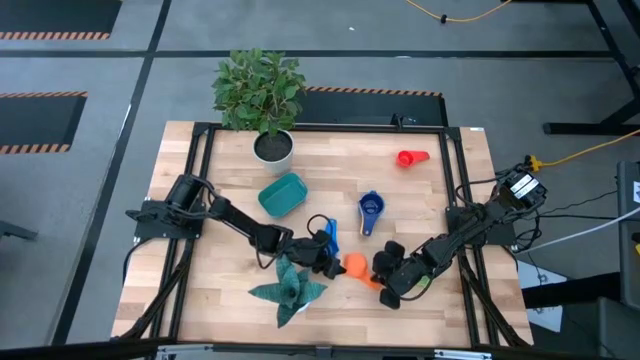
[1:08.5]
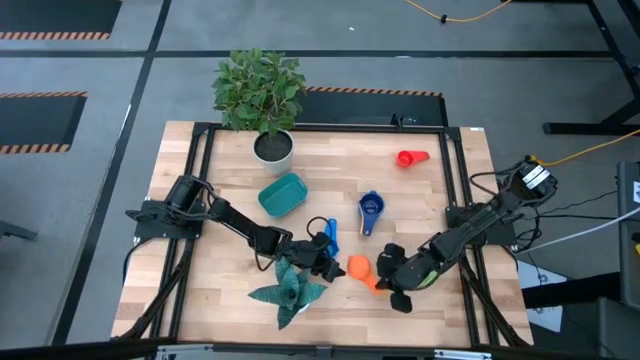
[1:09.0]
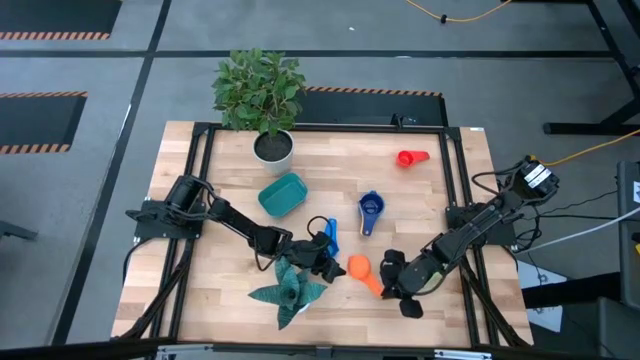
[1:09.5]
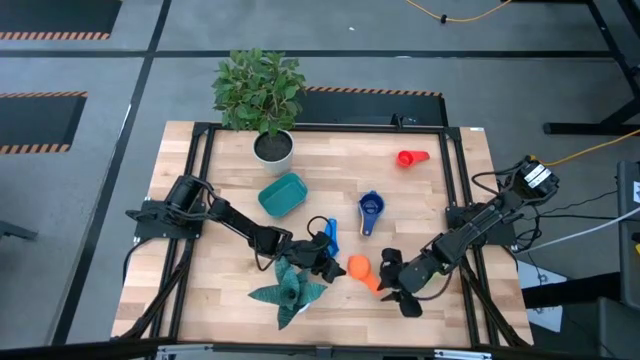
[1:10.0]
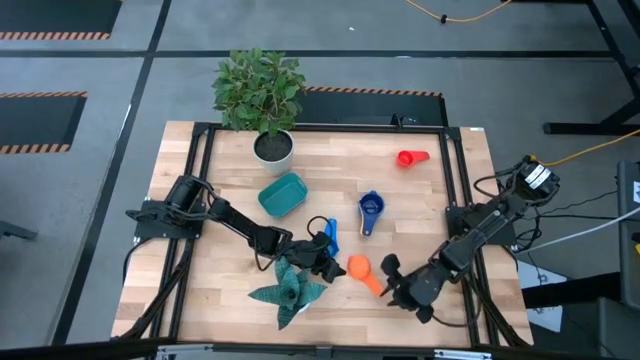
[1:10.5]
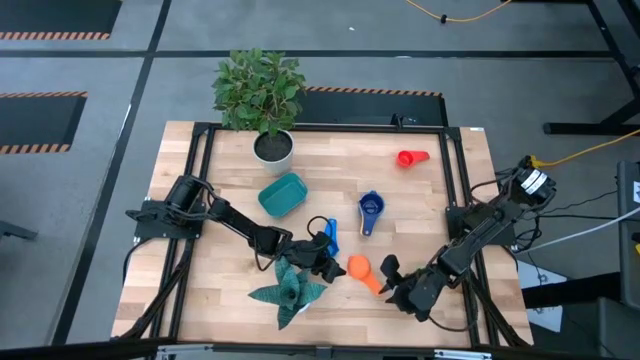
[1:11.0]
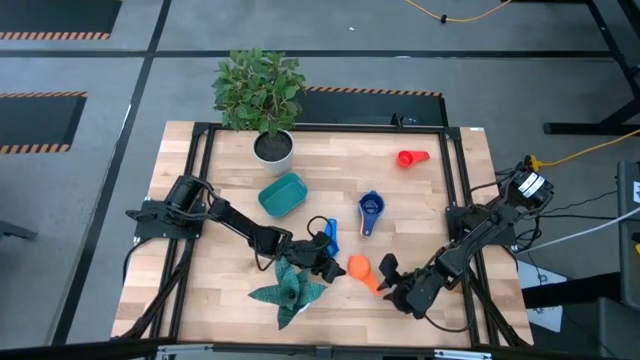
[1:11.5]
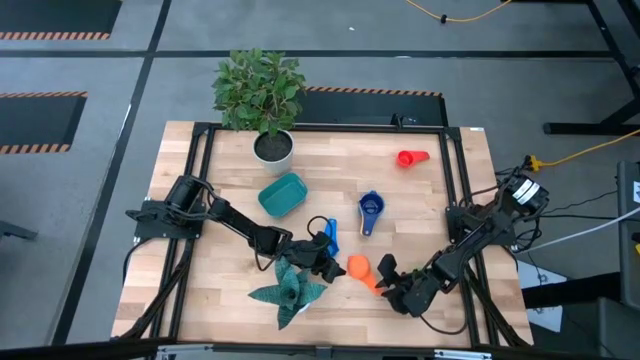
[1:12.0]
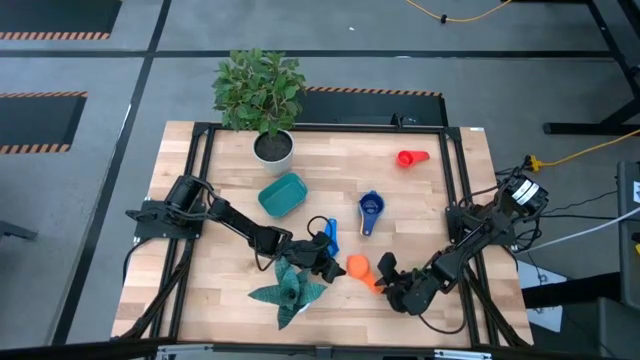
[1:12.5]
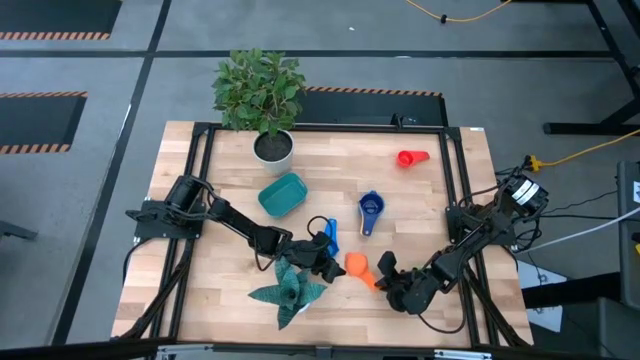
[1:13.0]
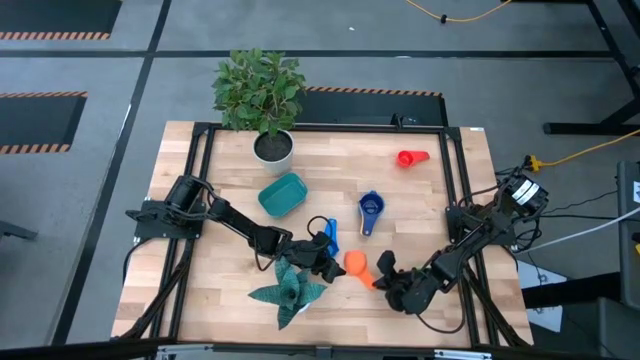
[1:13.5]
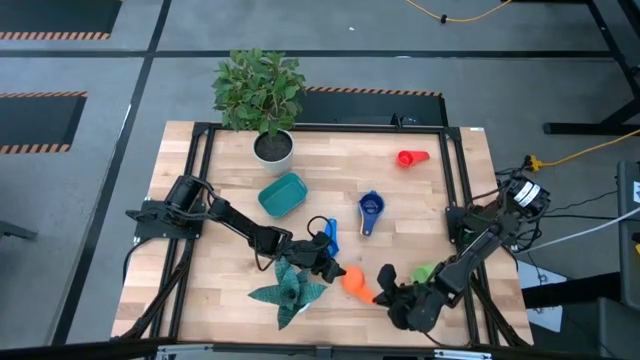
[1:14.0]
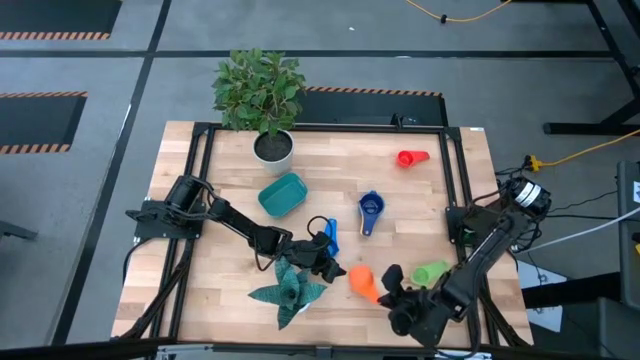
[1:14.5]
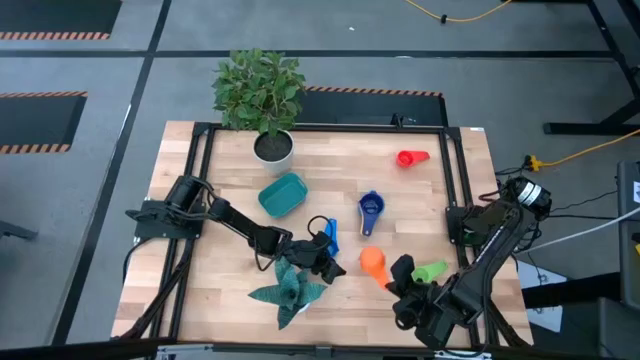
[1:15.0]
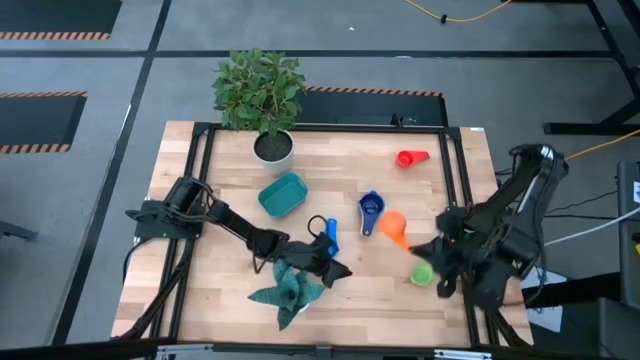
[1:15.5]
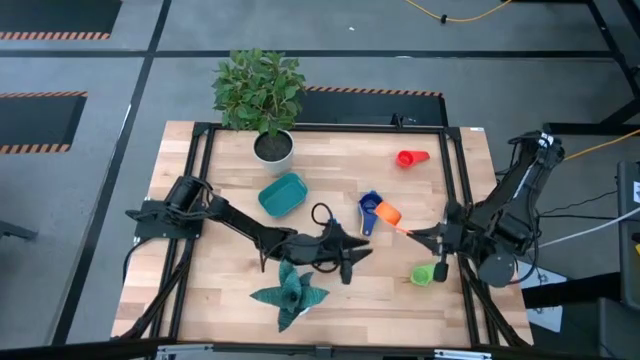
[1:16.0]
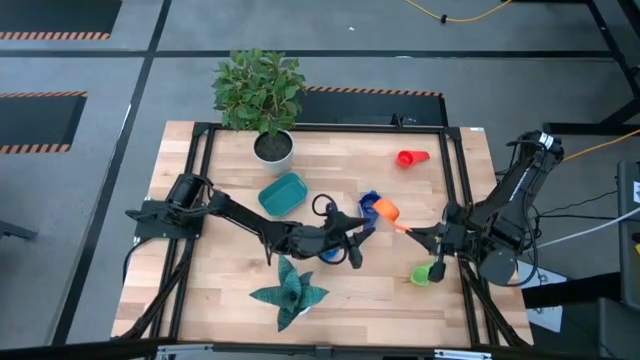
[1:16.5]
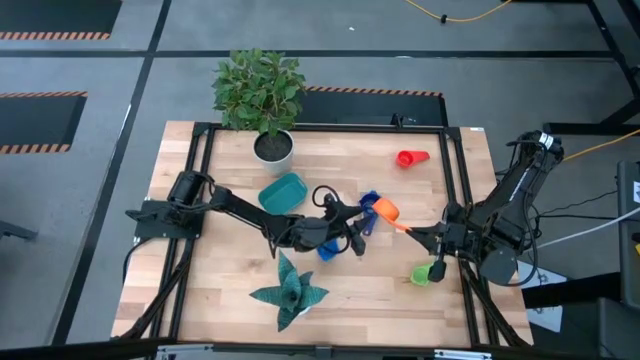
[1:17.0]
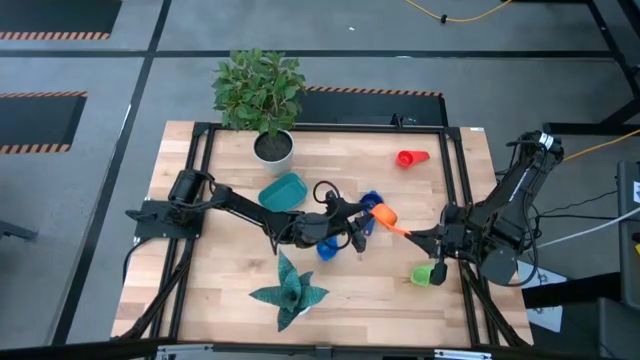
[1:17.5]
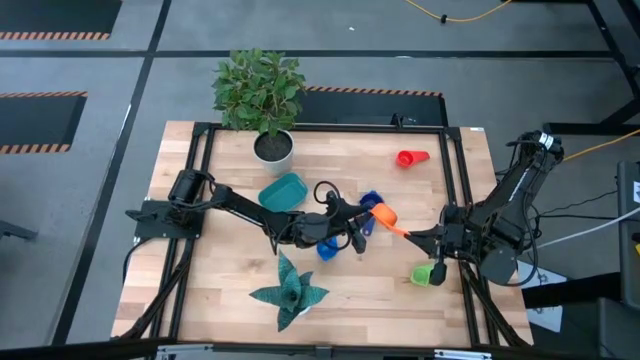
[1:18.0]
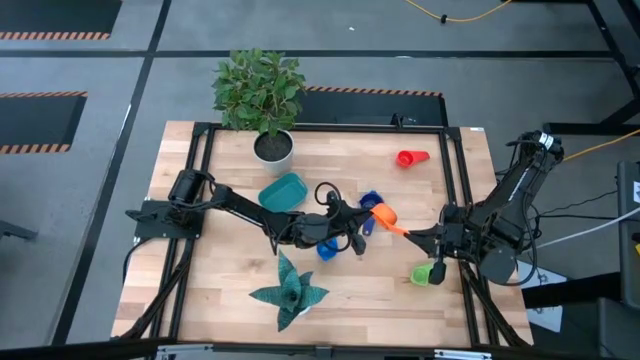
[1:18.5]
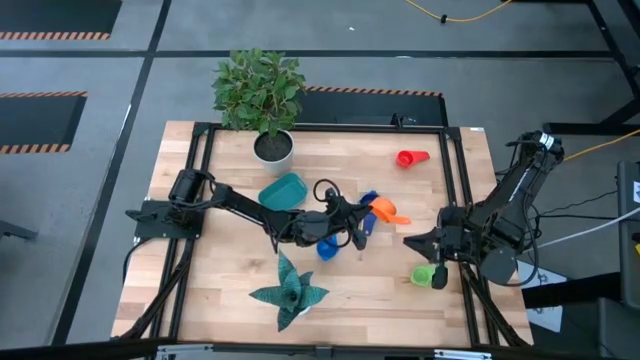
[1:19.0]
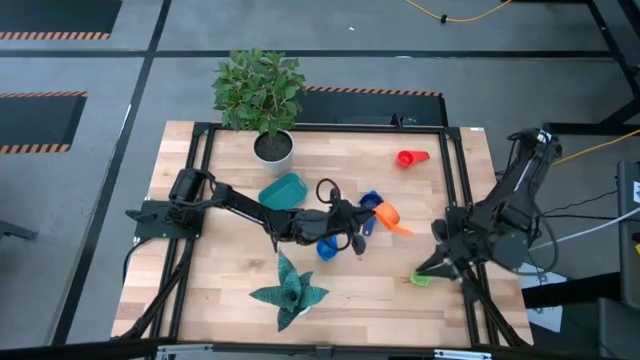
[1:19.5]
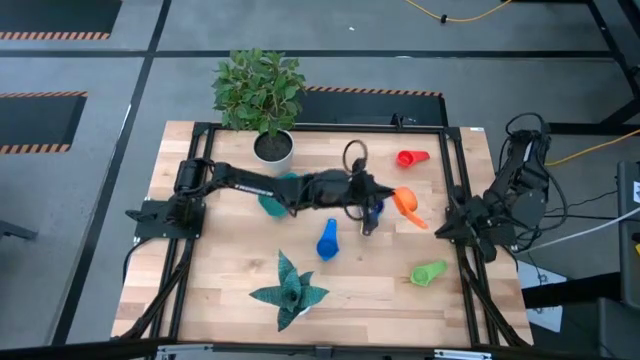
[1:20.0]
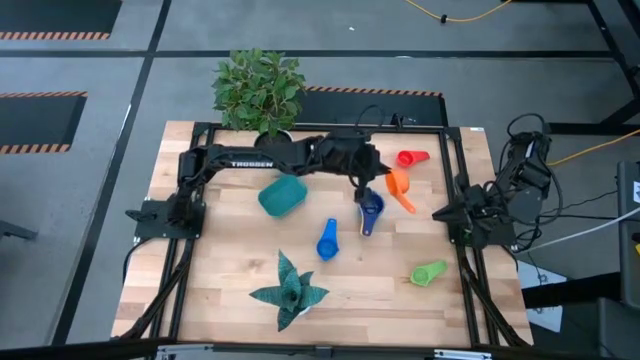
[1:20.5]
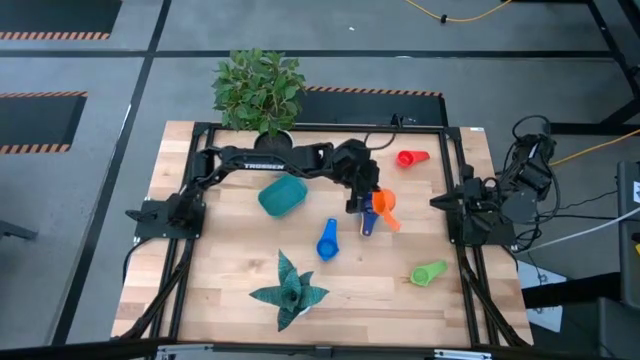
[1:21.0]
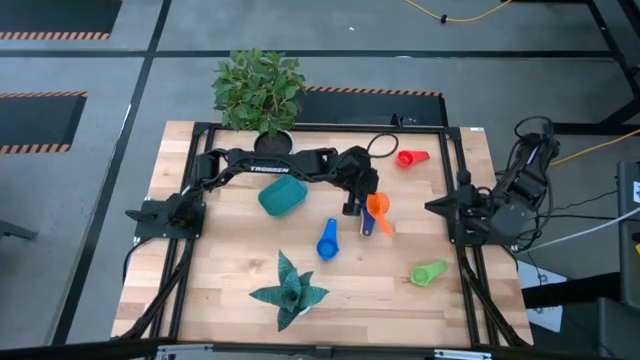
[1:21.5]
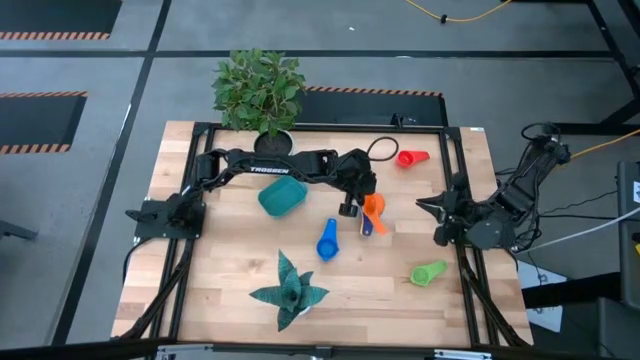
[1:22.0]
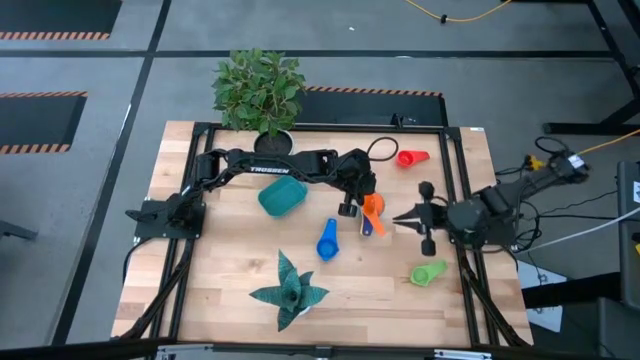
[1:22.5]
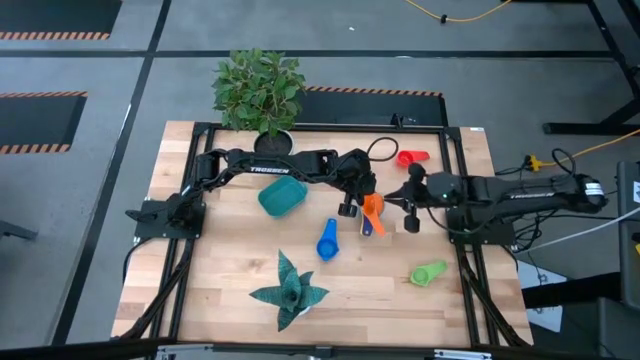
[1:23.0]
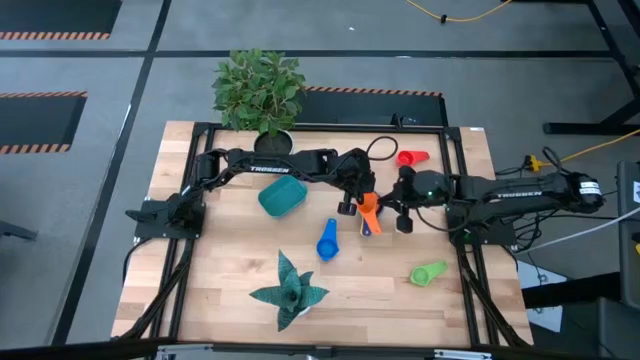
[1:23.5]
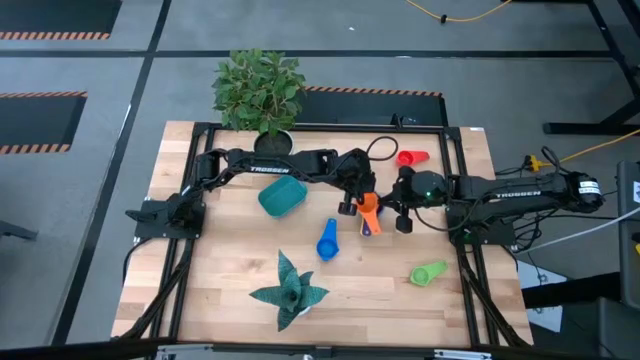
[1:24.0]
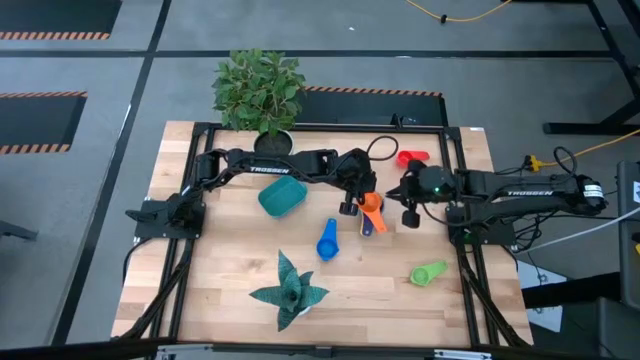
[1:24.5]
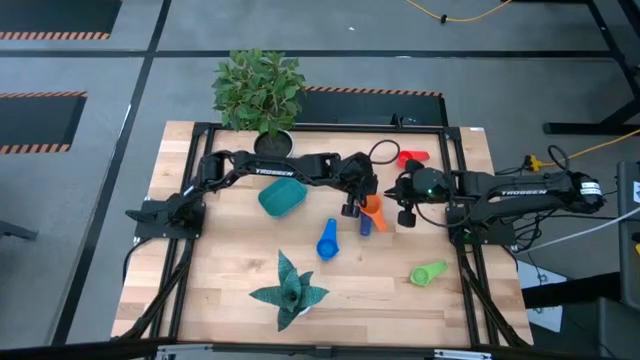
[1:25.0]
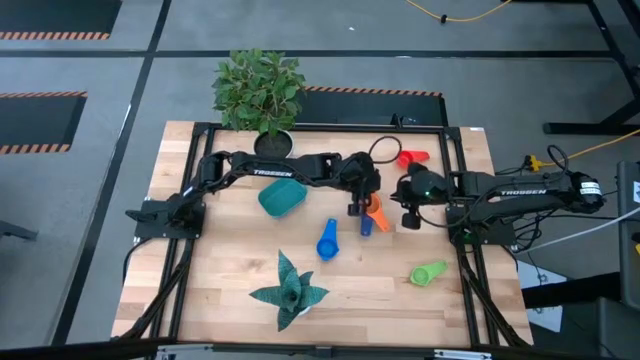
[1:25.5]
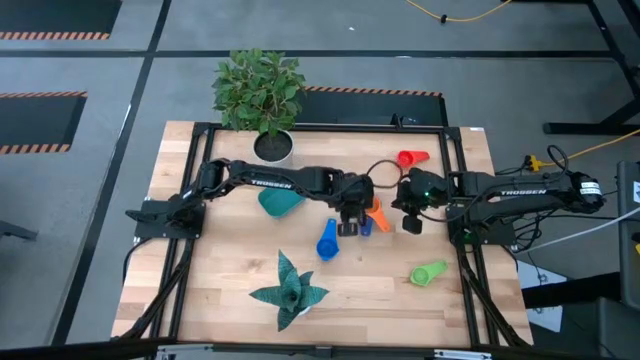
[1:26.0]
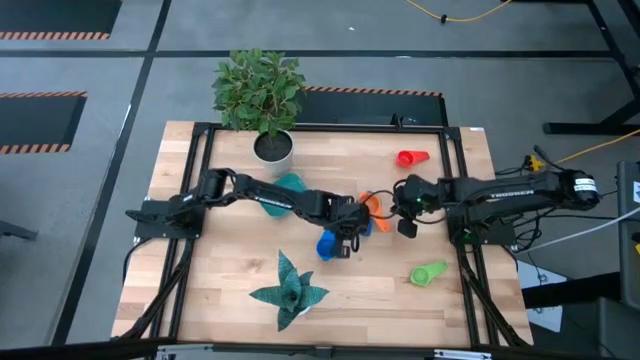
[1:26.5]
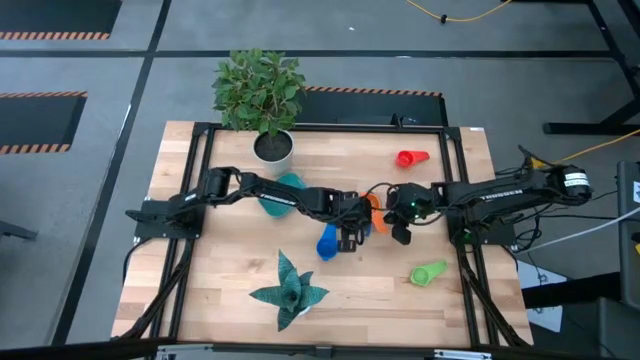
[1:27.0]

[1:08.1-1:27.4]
Task: Nest measuring cups in basket
Stack the orange measuring cup on top of the dark blue measuring cup

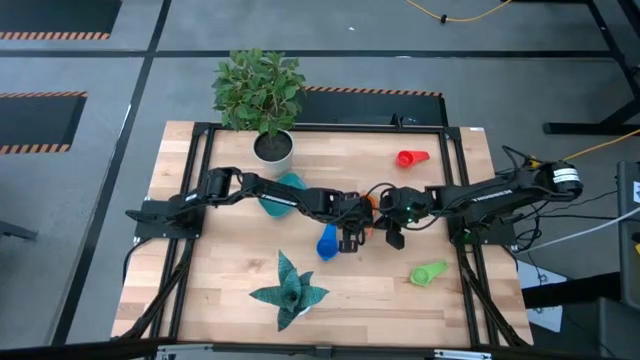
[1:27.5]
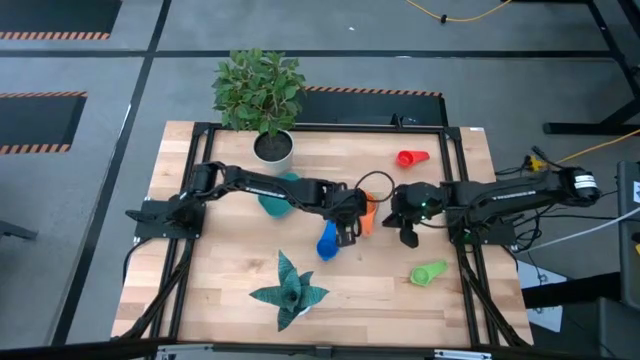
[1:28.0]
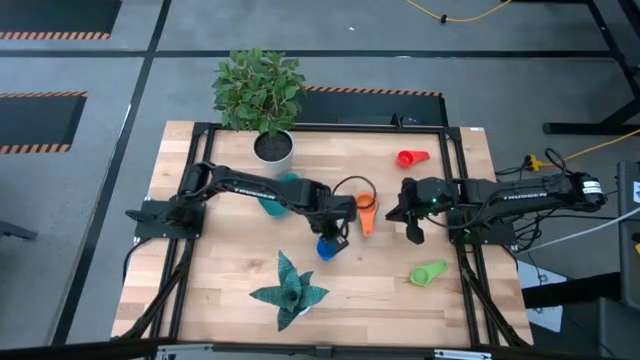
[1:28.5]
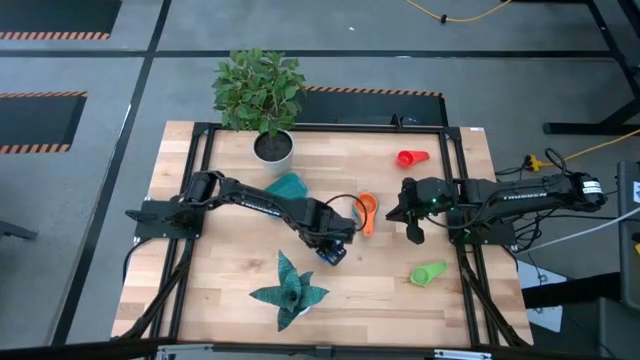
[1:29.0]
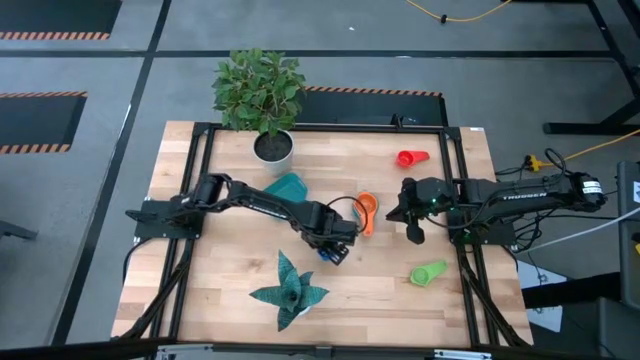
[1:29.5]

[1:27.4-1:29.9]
Stack the blue measuring cup on top of the orange measuring cup
